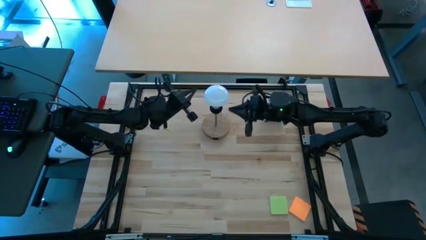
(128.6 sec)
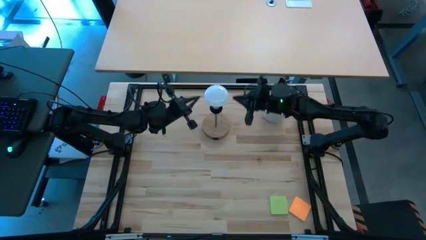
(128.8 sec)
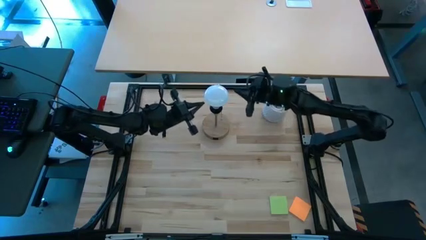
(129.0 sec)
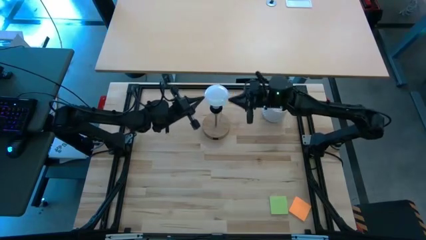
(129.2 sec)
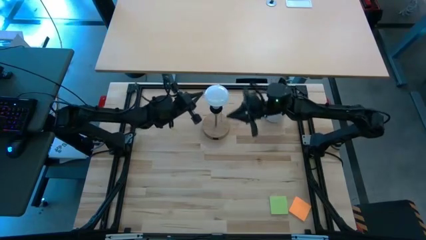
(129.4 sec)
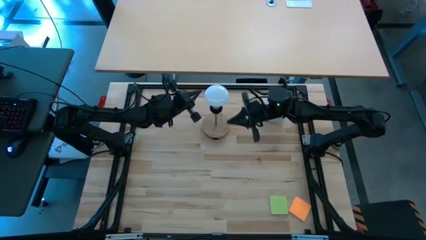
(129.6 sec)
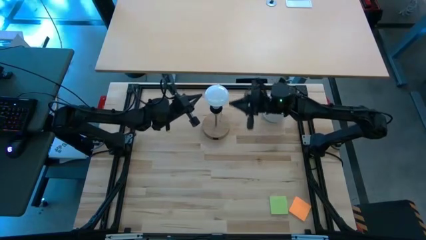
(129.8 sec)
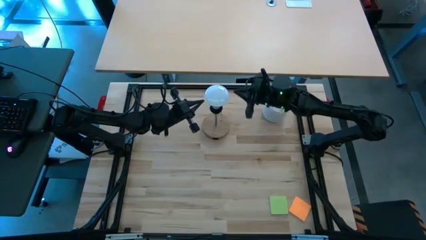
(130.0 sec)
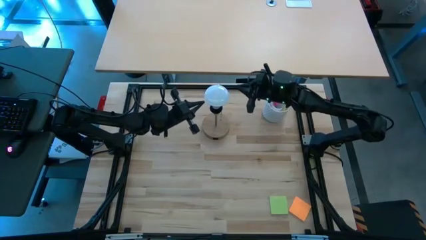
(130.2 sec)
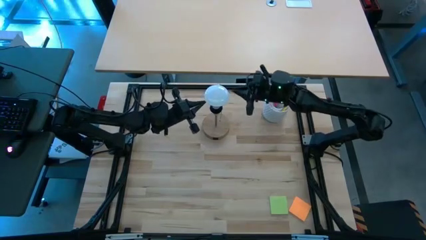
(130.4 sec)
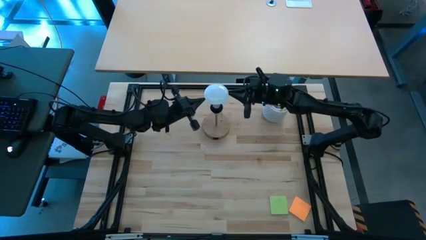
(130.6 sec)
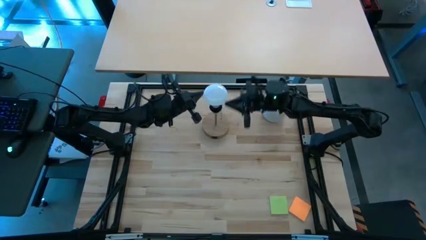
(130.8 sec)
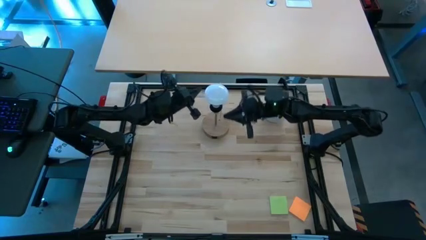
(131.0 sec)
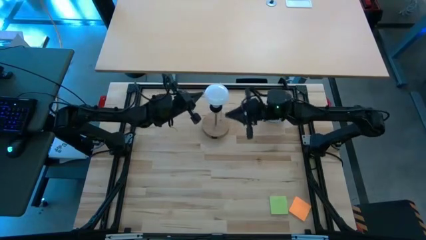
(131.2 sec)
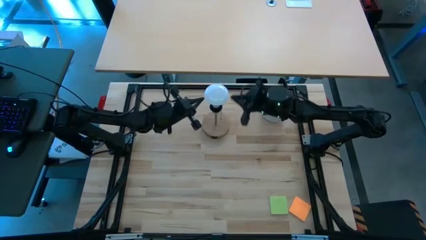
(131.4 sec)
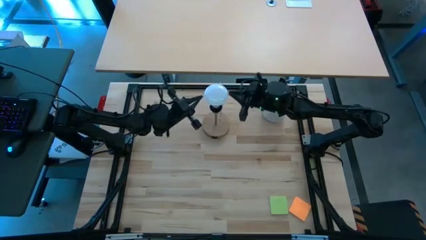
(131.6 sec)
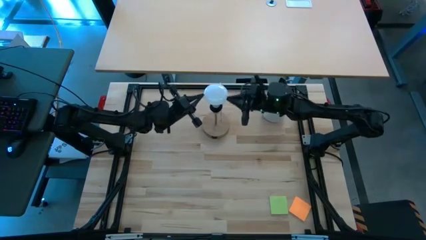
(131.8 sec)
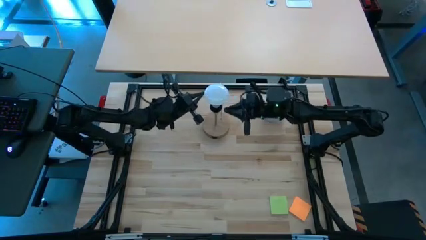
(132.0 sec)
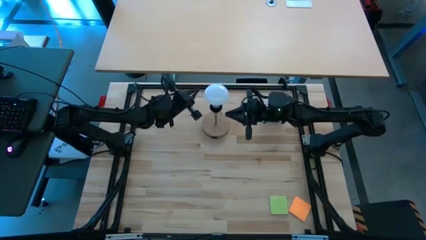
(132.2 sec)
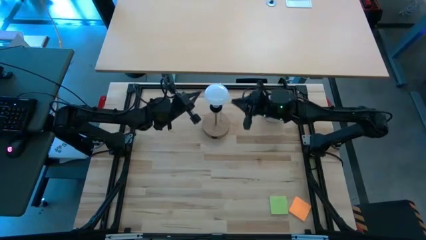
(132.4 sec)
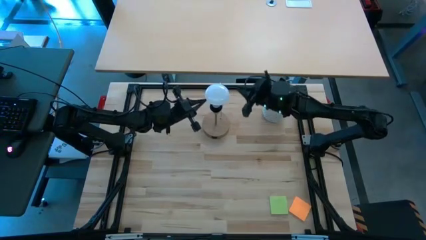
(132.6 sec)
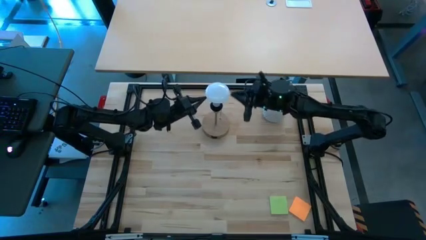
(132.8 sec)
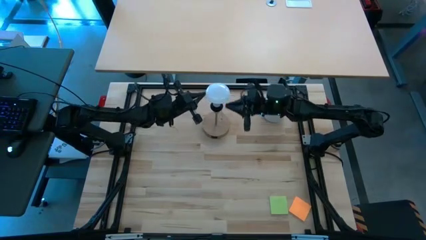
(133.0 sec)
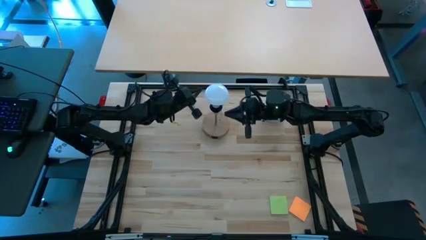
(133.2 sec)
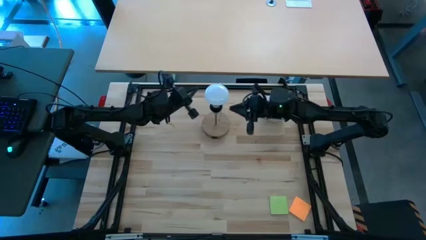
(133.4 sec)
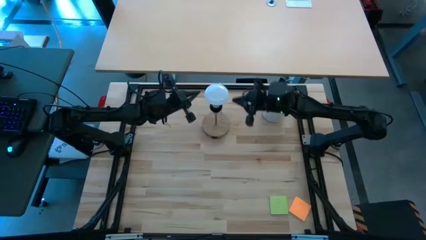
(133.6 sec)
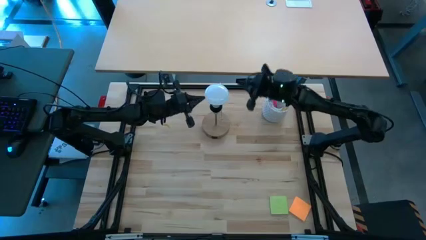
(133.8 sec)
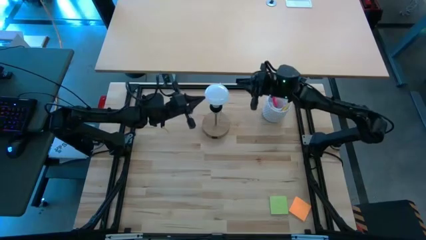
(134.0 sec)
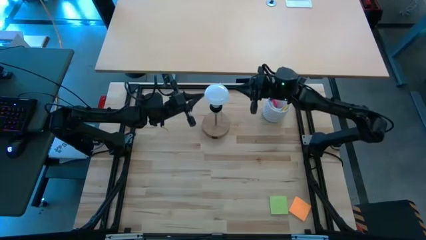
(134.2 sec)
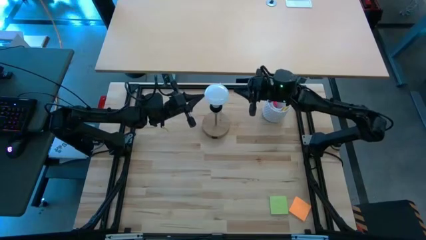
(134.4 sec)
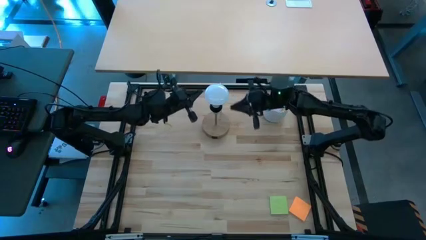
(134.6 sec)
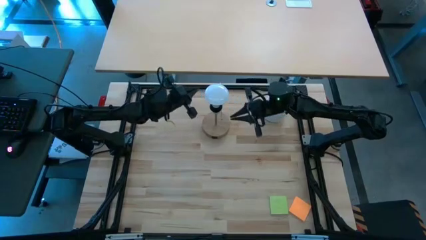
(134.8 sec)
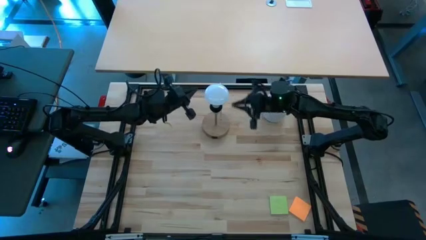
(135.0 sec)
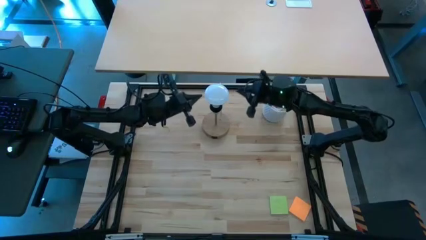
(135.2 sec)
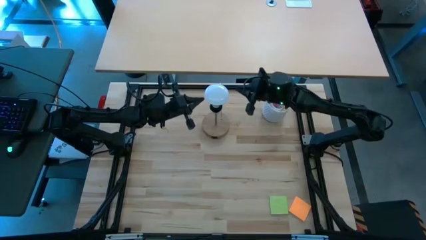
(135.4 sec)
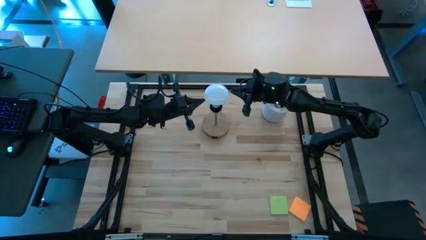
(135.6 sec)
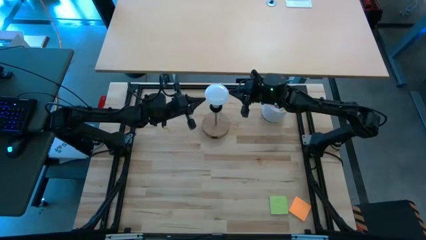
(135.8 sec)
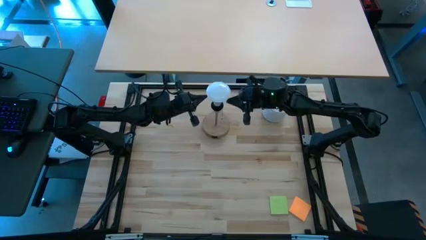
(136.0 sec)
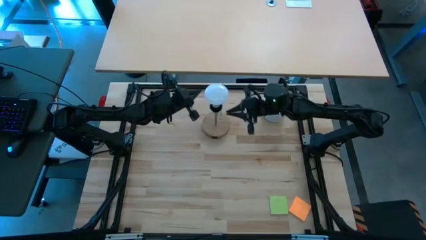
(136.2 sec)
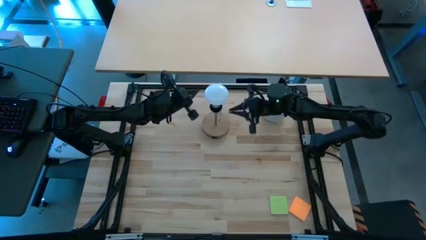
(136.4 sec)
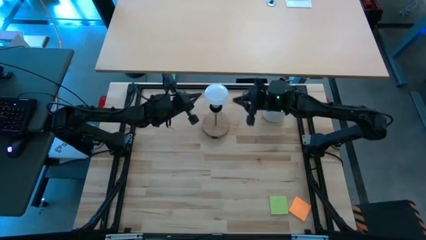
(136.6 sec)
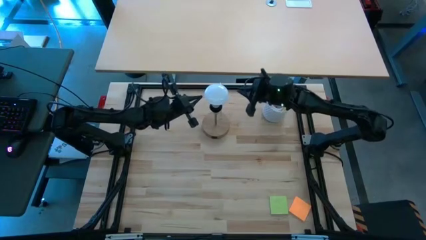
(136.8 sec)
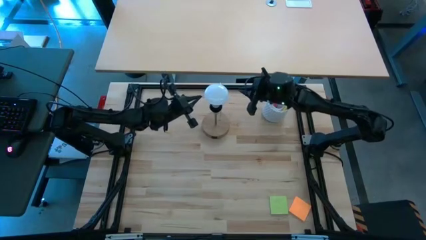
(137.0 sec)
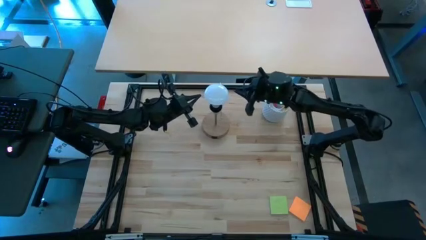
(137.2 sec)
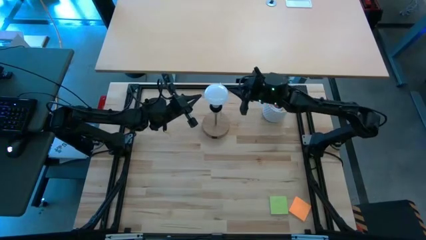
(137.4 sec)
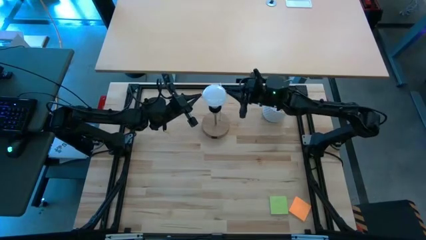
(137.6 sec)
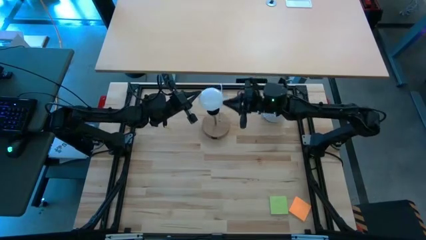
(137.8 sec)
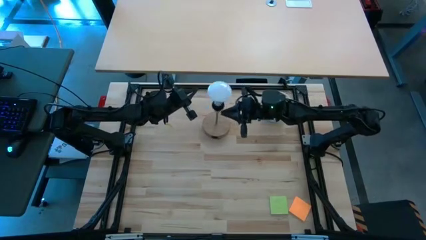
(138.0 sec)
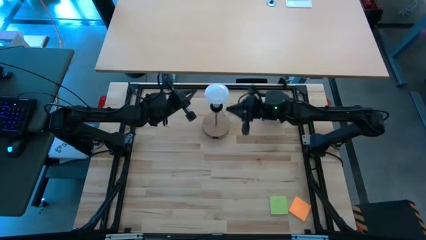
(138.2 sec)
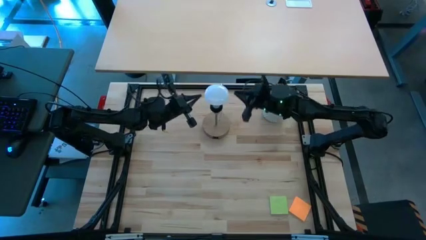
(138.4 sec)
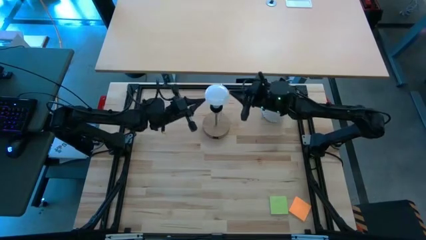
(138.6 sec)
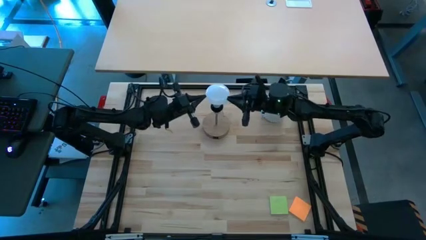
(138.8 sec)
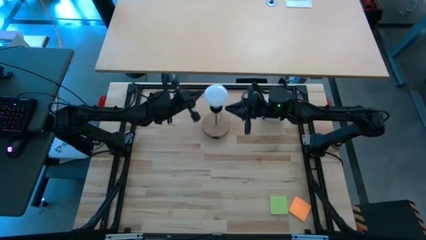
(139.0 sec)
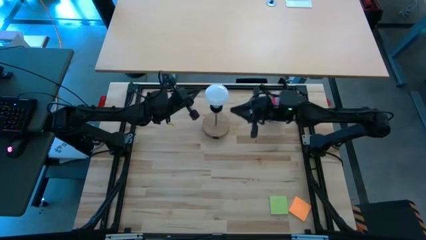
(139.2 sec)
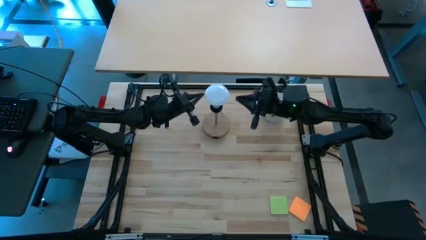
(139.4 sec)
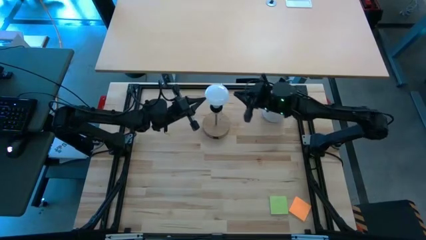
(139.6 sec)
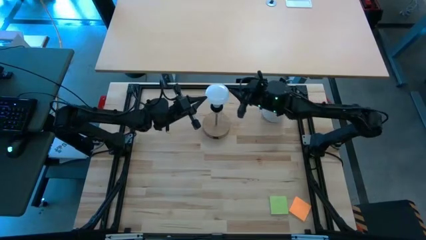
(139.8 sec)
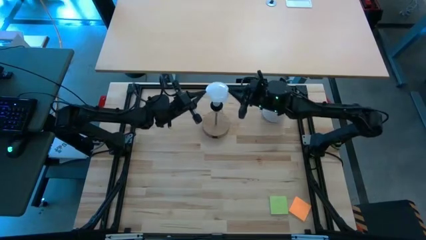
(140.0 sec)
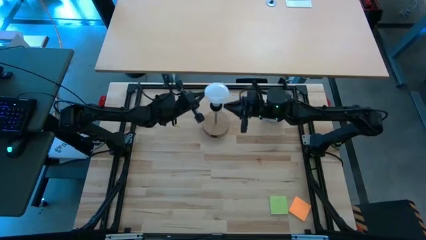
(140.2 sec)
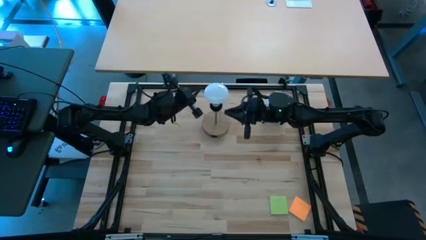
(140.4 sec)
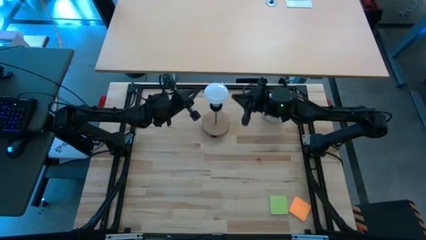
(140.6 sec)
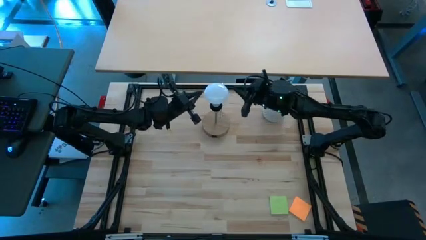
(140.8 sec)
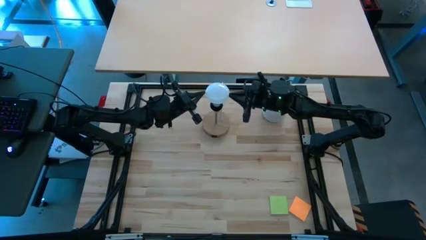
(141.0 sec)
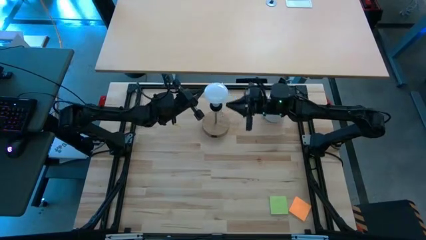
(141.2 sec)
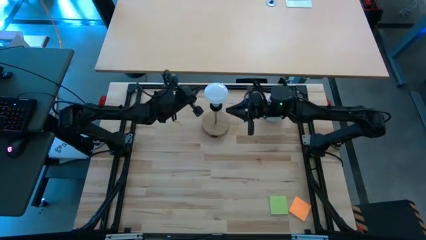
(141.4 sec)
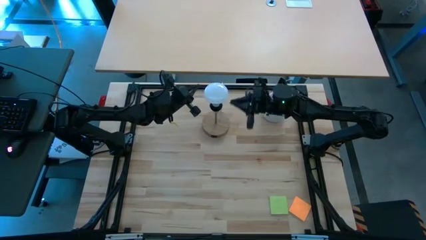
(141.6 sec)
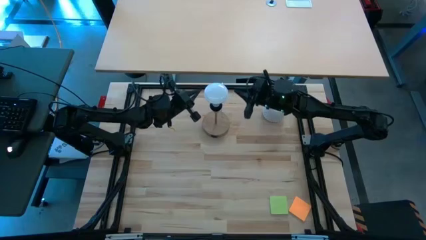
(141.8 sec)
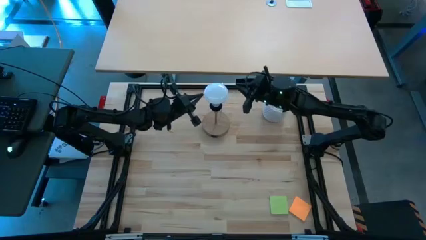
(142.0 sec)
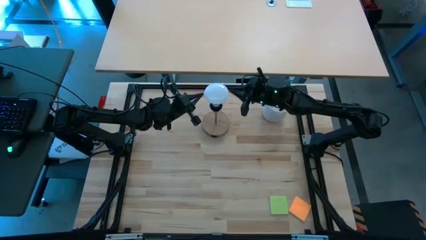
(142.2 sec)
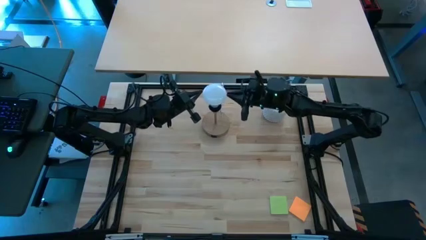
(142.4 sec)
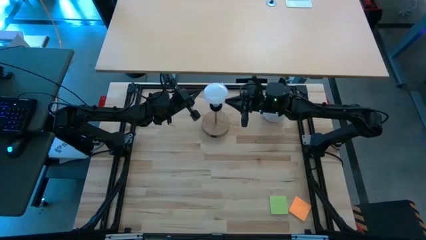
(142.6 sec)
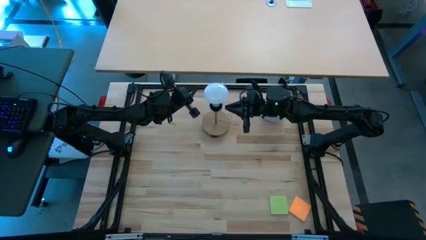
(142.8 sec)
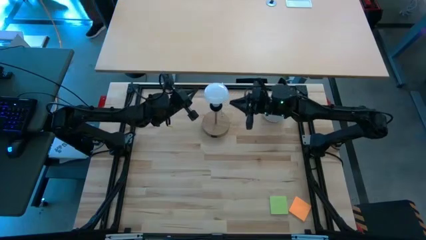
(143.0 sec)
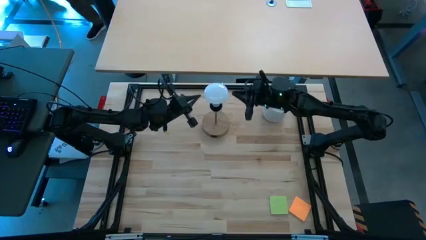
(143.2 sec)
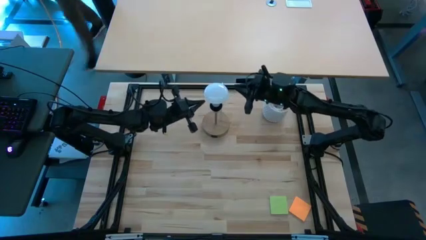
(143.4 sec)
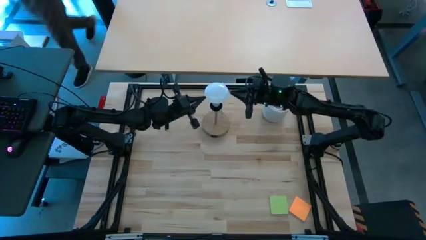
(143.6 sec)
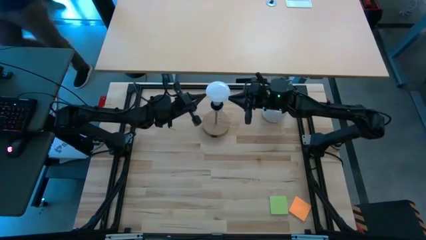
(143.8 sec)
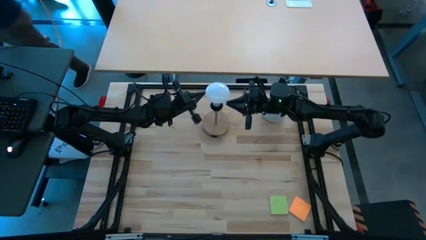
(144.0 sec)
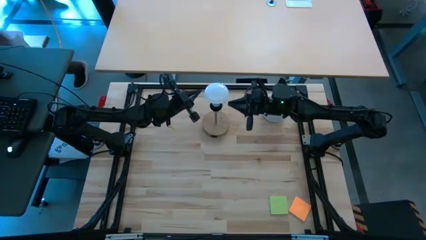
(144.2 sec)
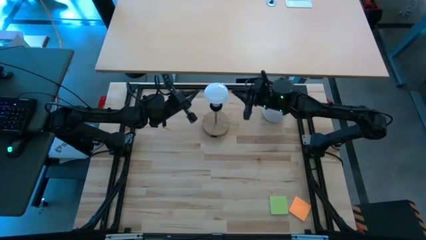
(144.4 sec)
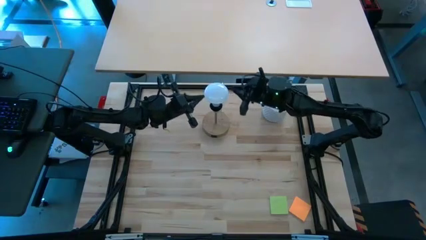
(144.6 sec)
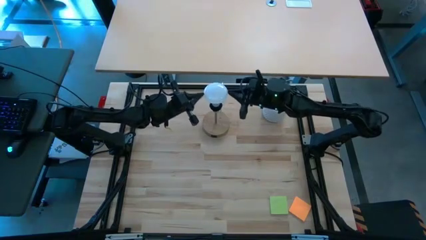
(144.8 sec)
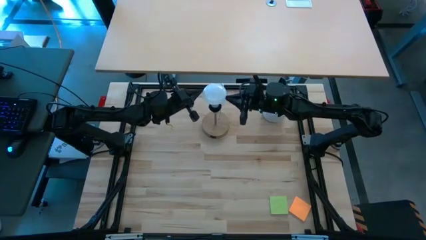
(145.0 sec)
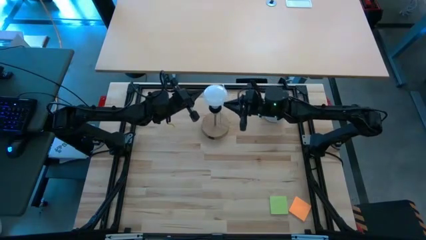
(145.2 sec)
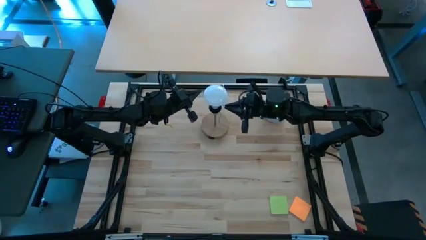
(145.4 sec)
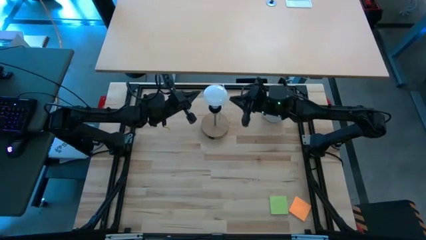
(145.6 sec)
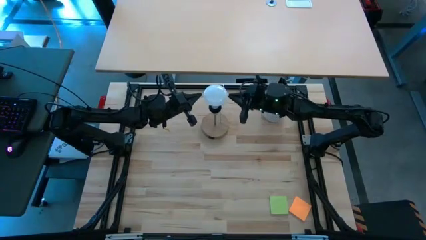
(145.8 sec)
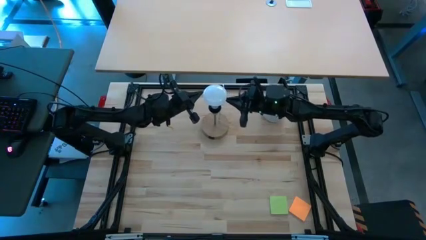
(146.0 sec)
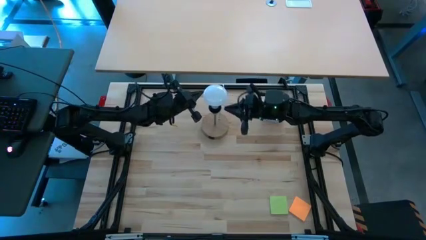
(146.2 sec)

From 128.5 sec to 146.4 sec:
Task: Screw lightbulb
Insert the white lightbulb into the desk lamp
